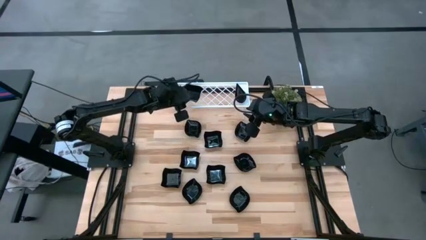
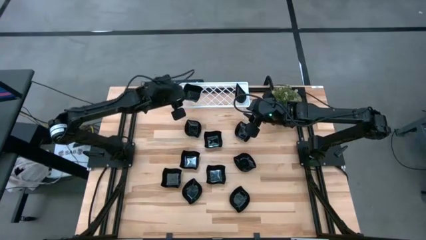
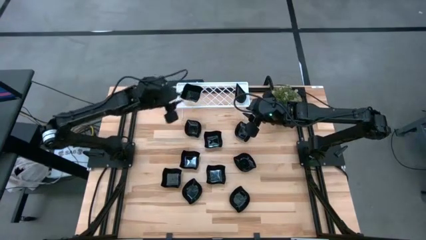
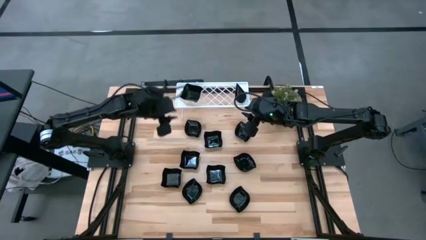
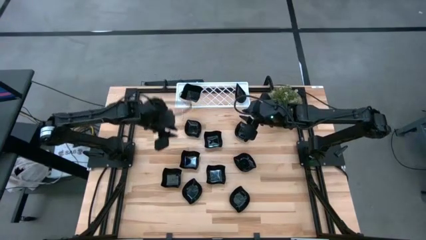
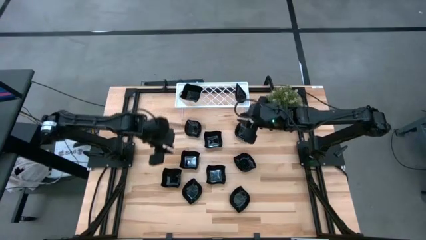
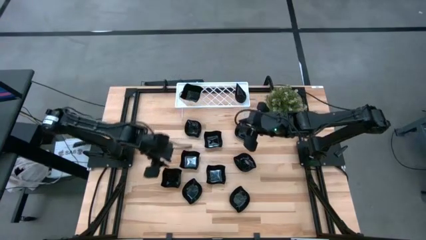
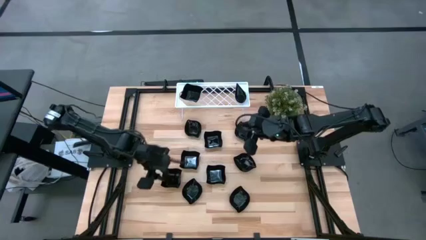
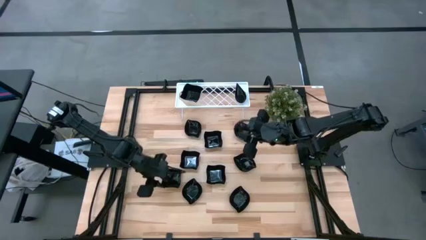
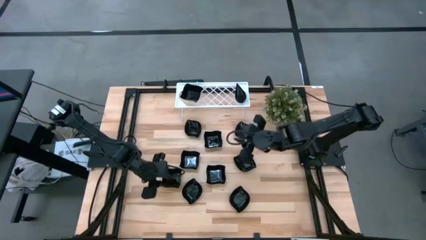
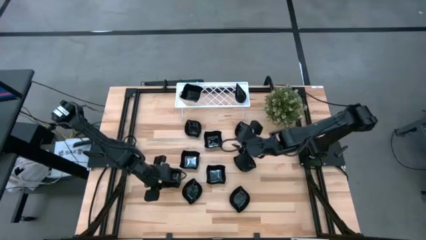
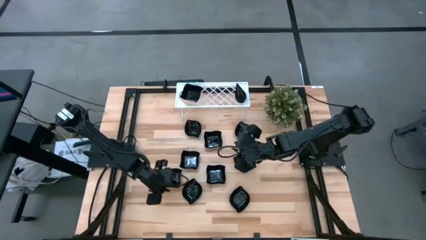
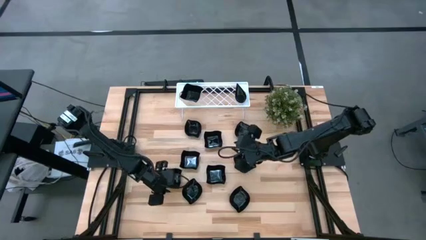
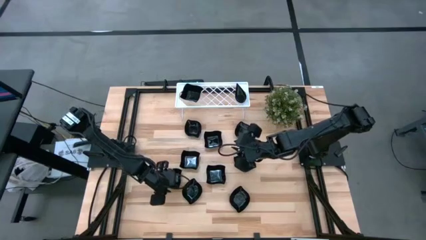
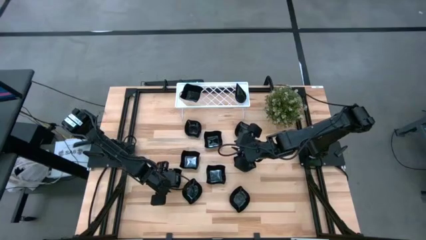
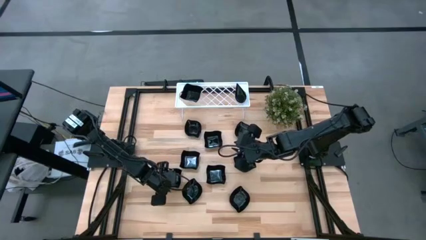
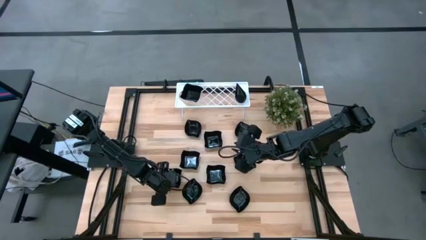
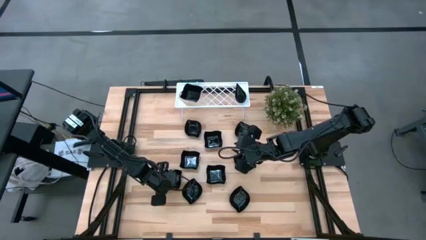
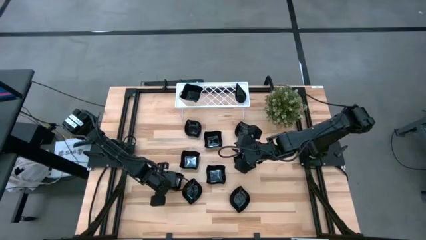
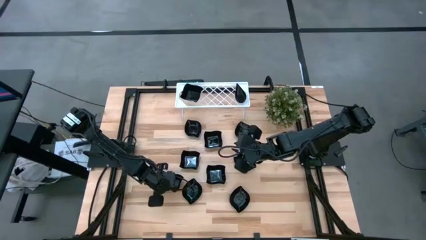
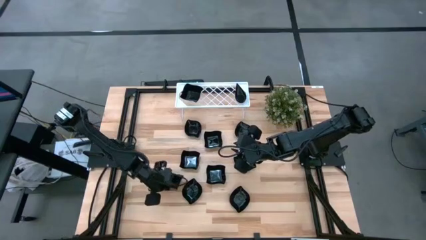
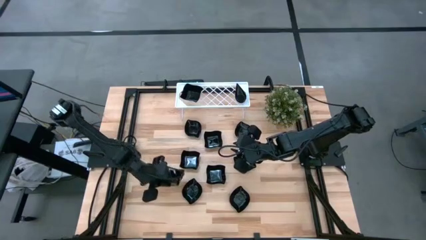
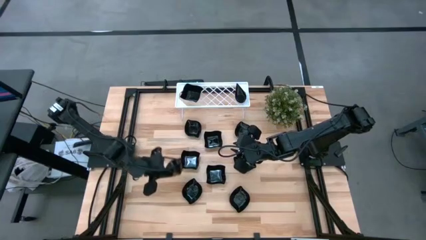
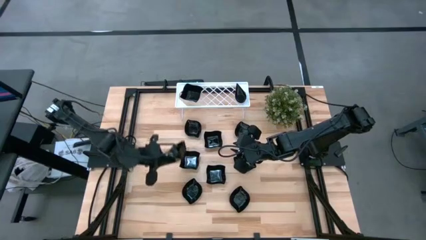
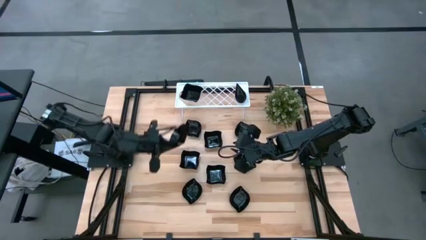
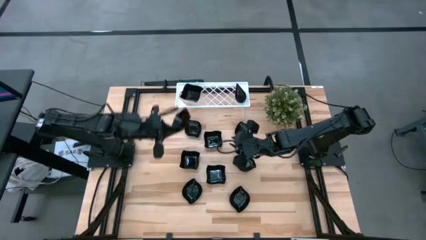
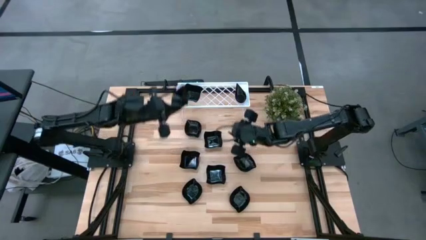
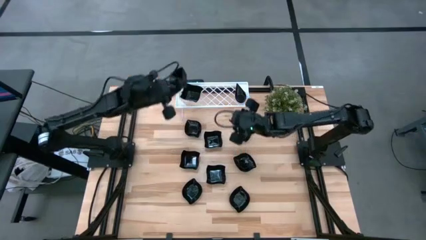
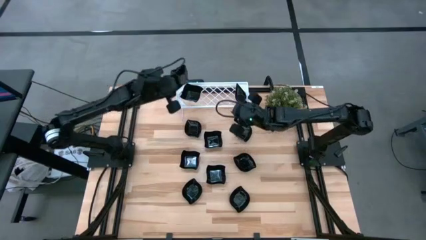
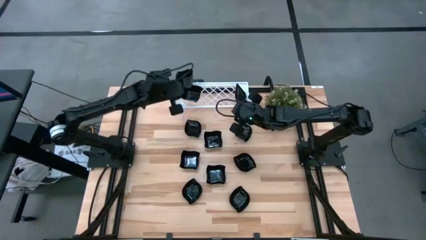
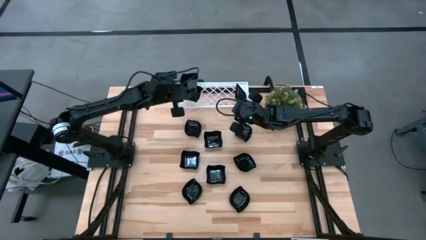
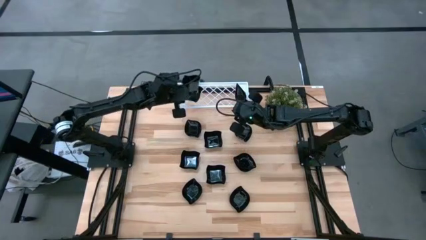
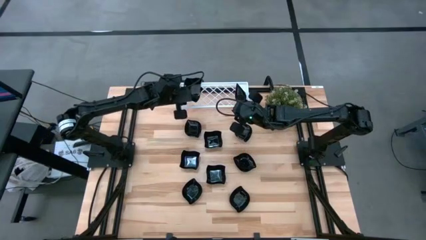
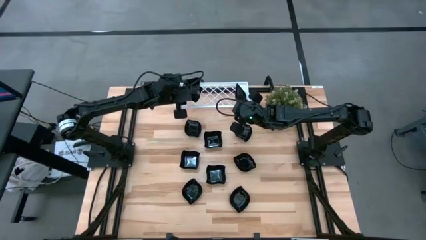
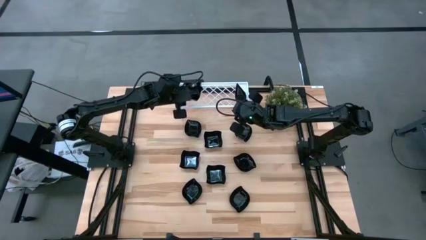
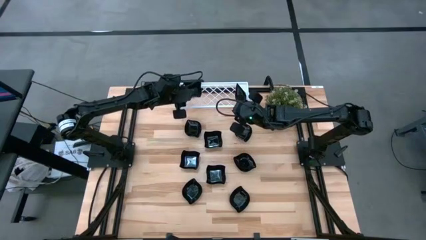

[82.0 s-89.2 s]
Task: Pick & Place Mini shaped plates
Stack the distorted square plate on top of the distorted square plate on the shelf

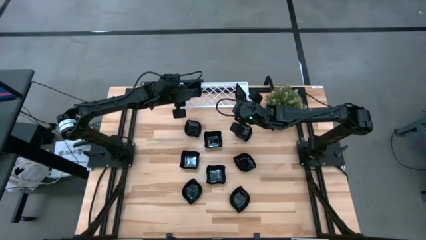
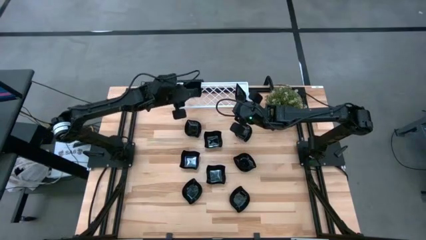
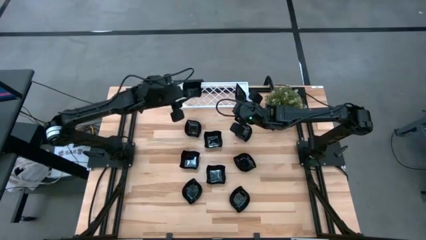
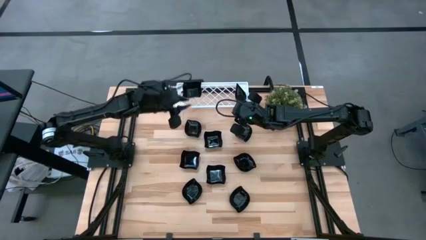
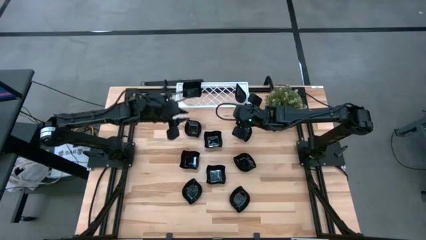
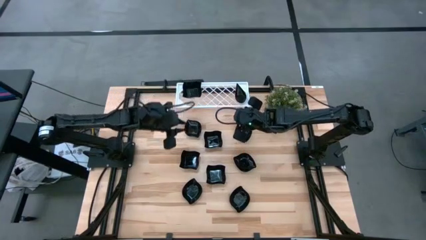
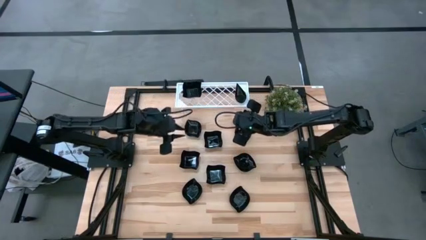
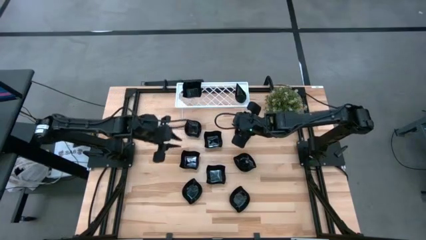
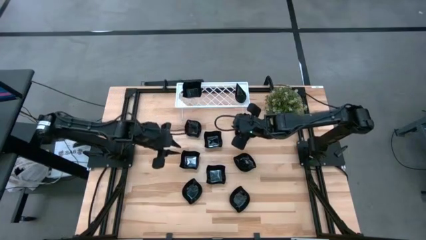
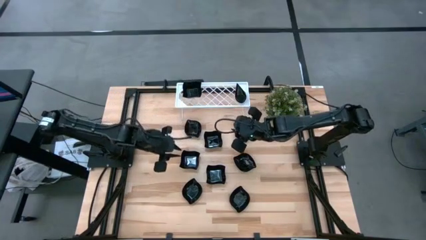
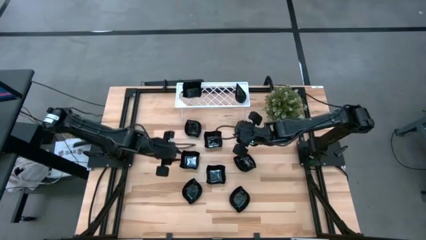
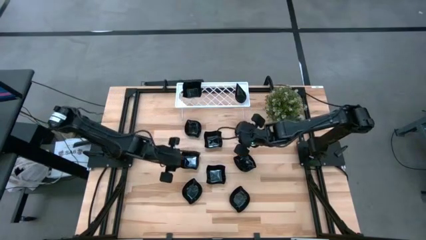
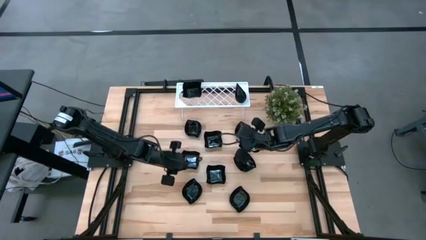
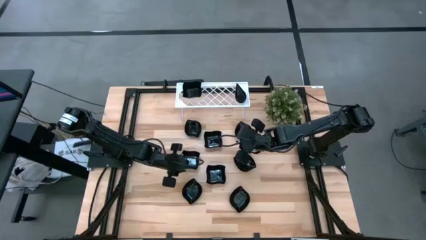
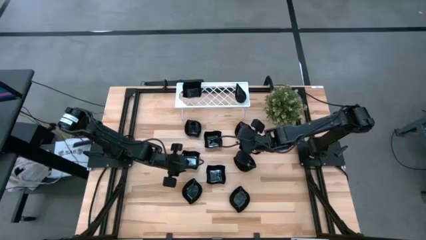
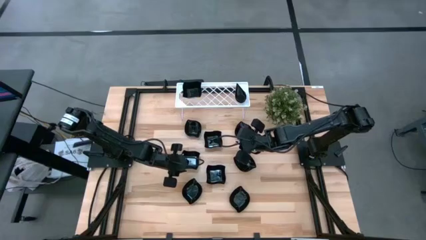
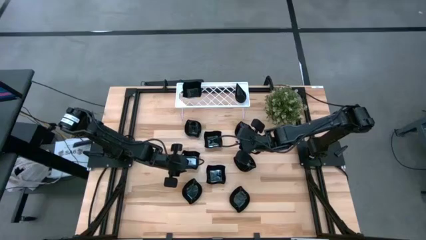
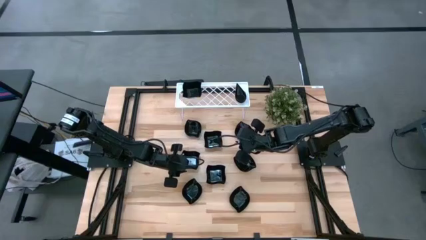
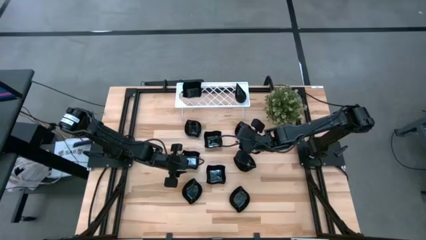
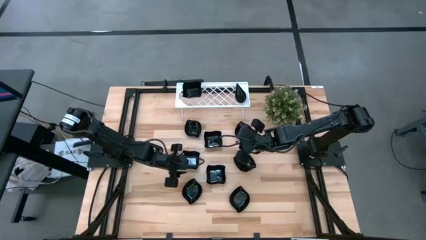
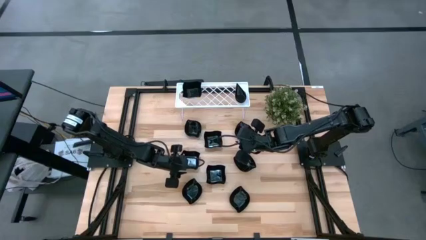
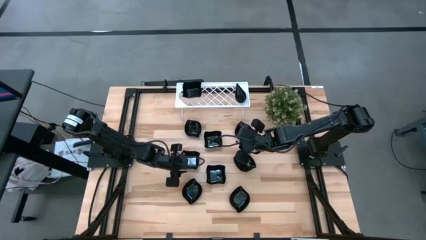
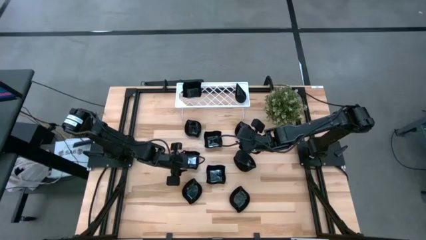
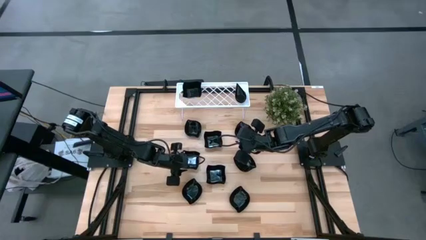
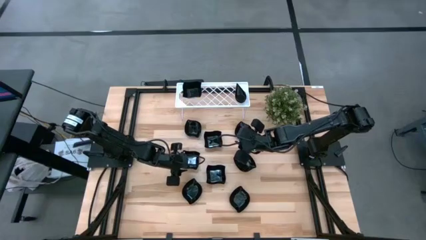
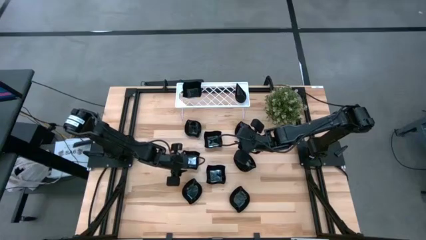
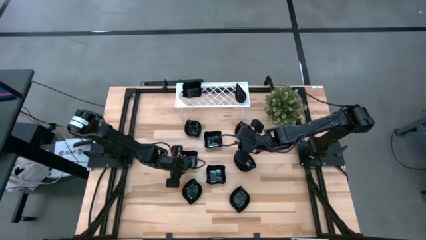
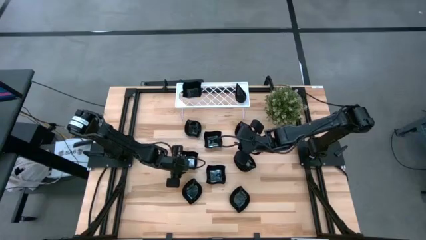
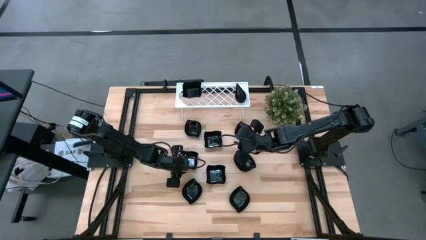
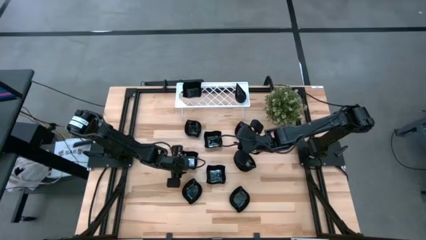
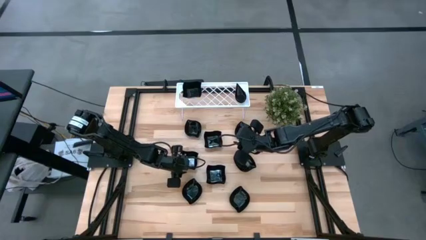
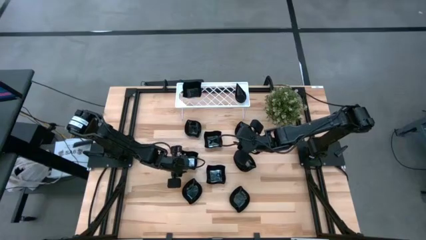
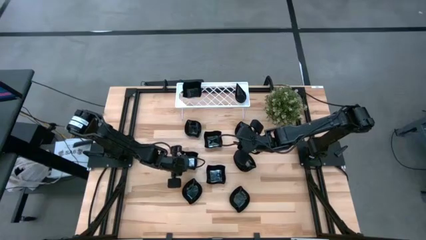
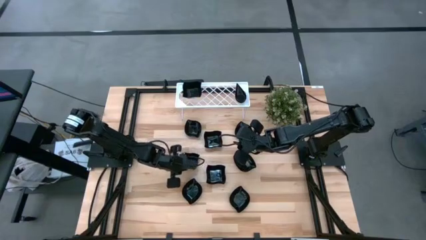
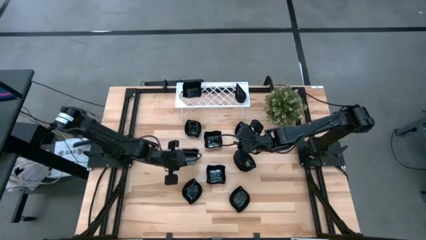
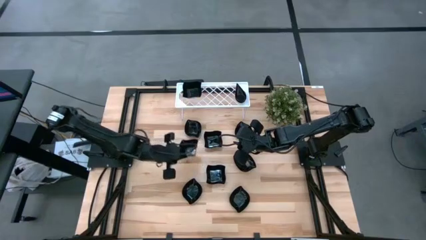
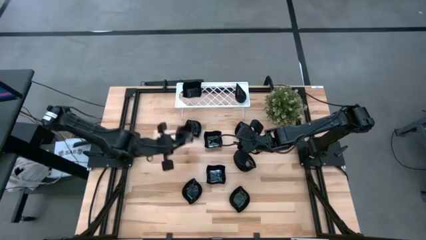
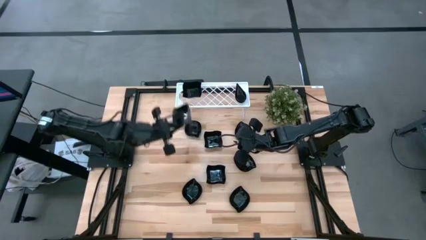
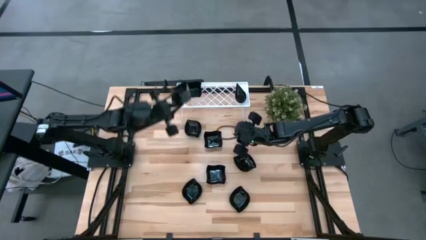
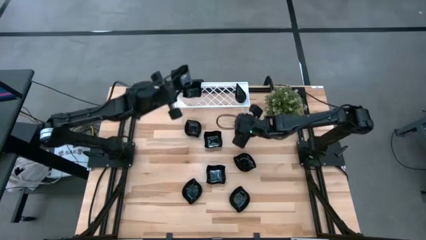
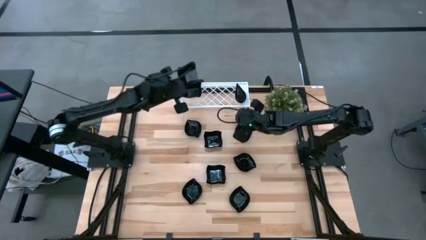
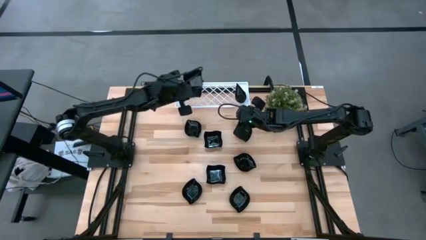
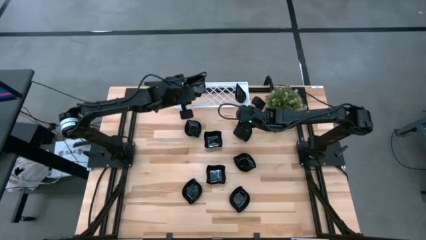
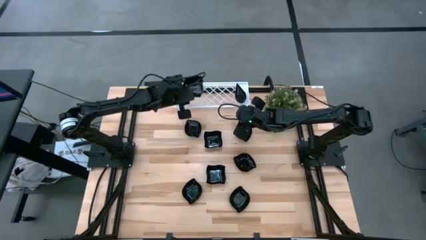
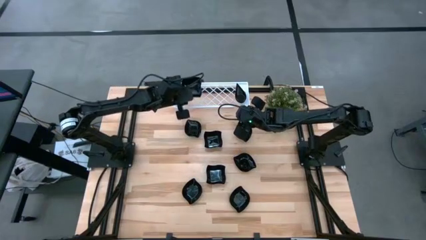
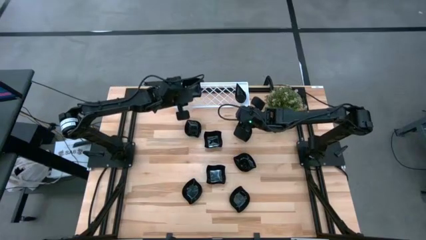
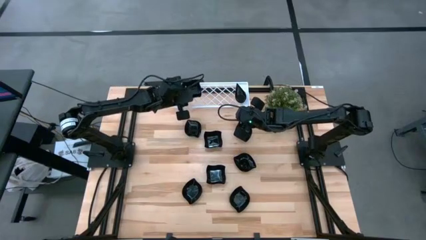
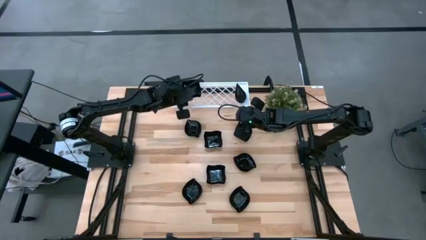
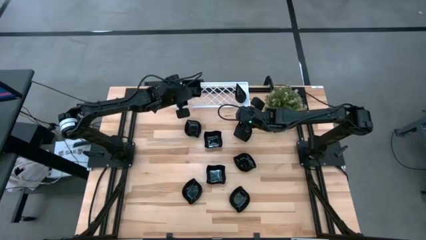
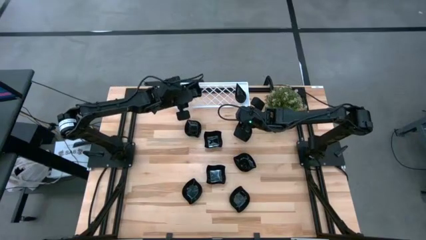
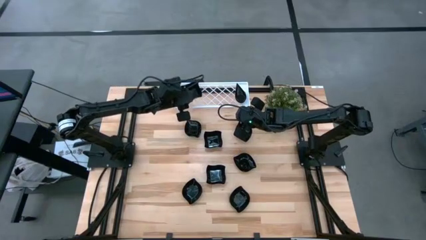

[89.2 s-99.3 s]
Stack the distorted square plate on top of the distorted square plate on the shelf
